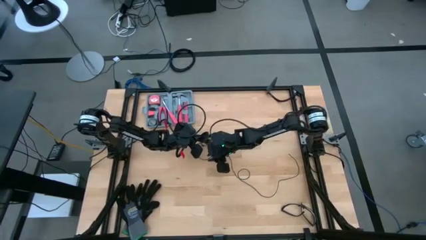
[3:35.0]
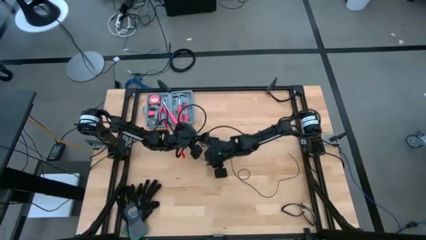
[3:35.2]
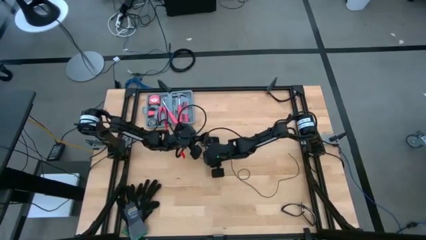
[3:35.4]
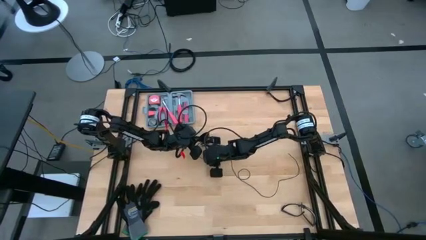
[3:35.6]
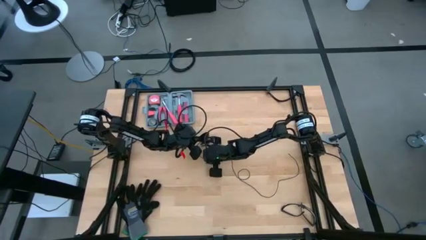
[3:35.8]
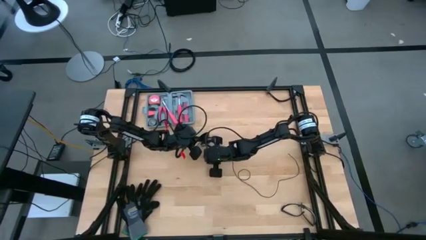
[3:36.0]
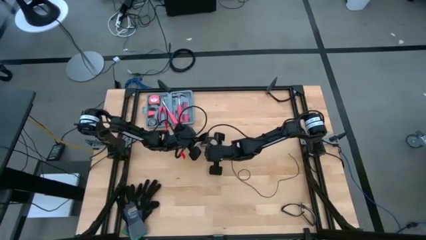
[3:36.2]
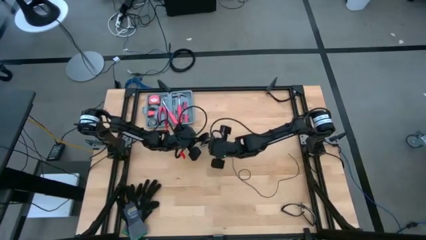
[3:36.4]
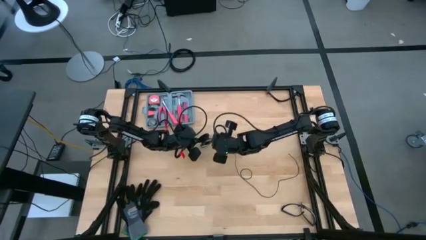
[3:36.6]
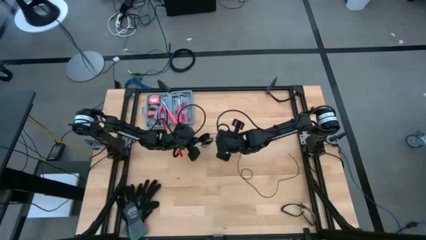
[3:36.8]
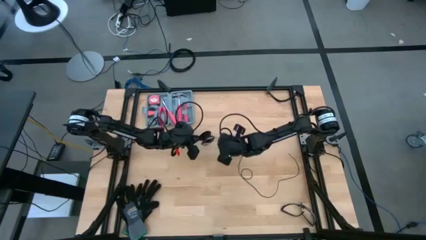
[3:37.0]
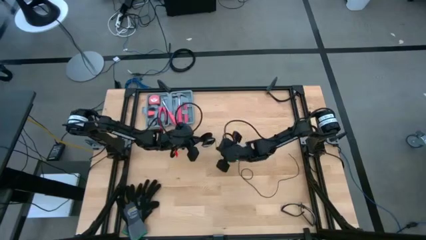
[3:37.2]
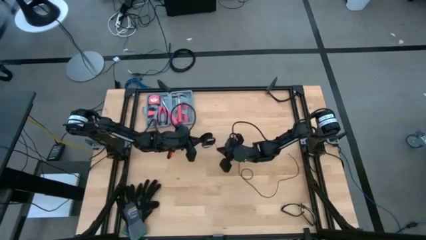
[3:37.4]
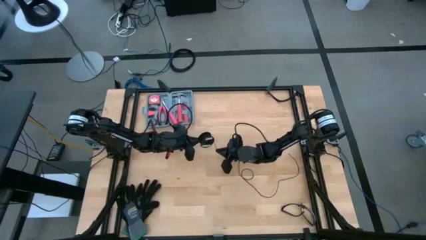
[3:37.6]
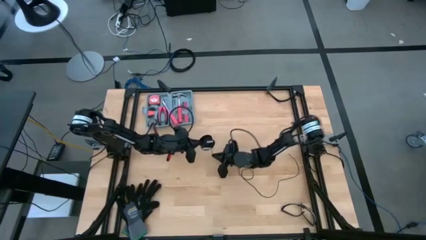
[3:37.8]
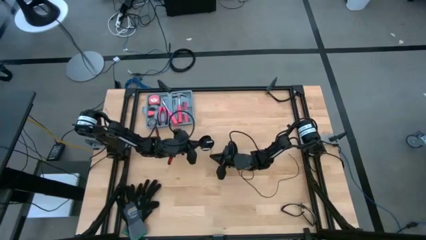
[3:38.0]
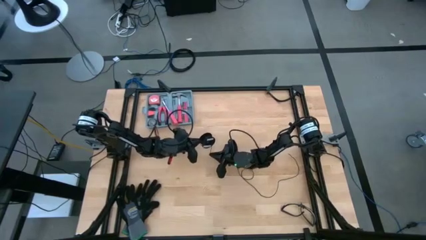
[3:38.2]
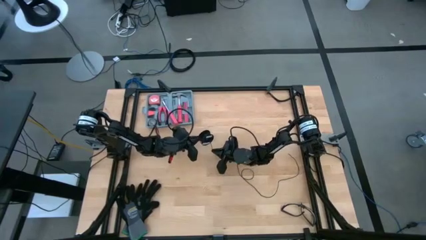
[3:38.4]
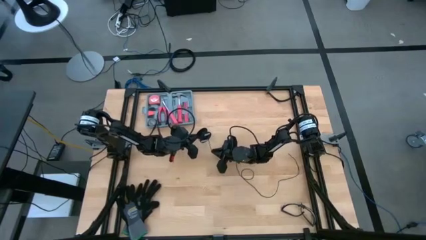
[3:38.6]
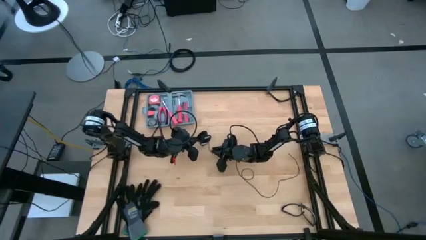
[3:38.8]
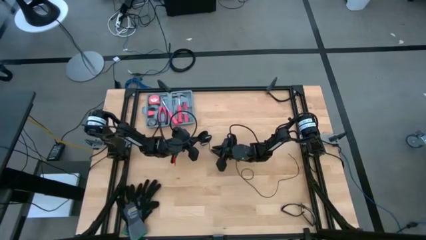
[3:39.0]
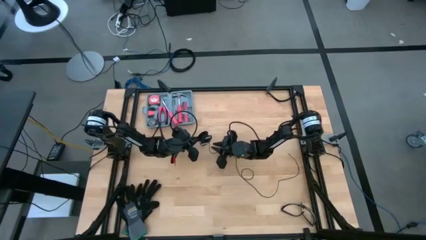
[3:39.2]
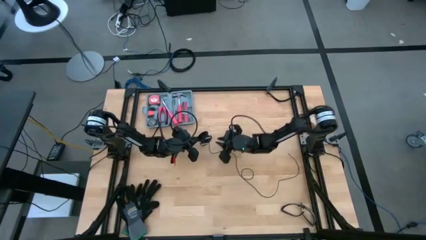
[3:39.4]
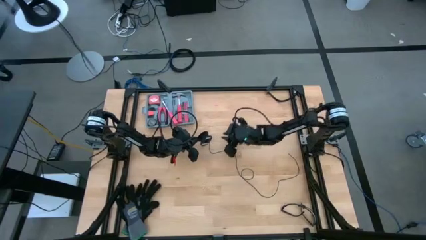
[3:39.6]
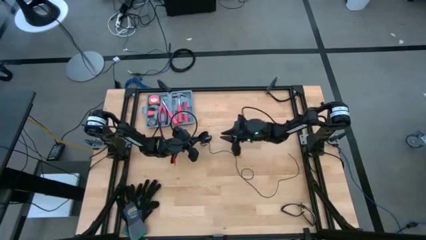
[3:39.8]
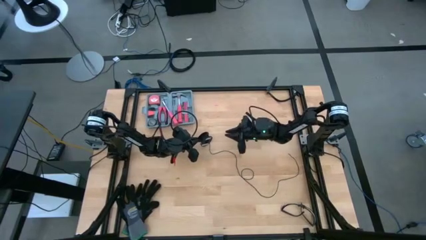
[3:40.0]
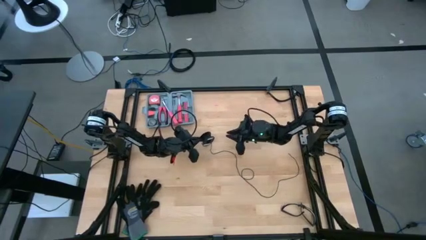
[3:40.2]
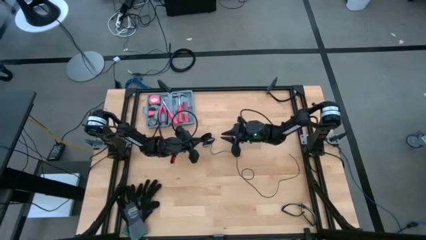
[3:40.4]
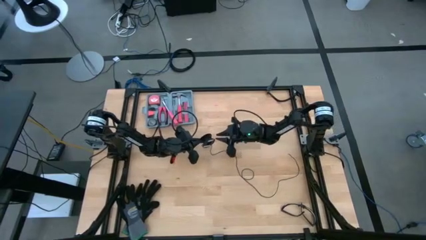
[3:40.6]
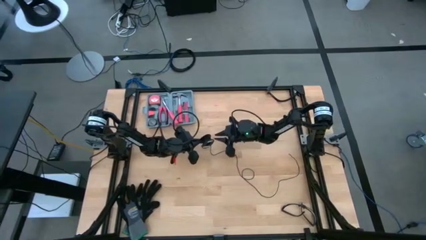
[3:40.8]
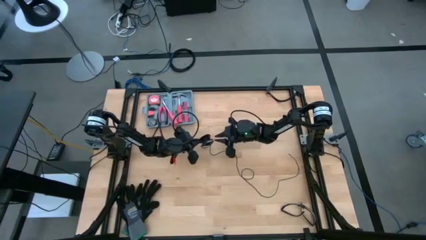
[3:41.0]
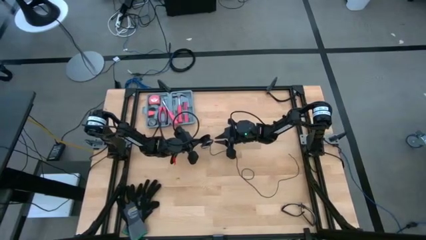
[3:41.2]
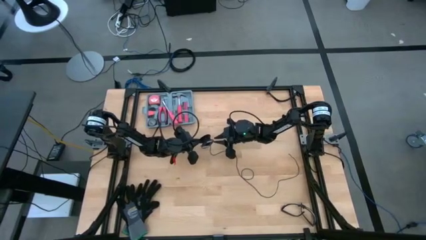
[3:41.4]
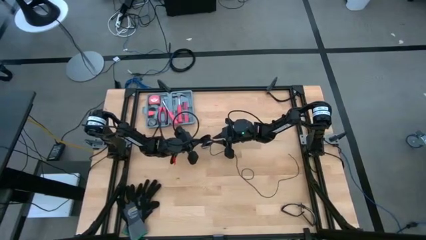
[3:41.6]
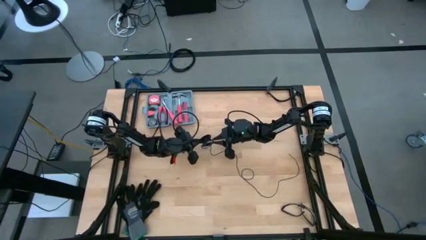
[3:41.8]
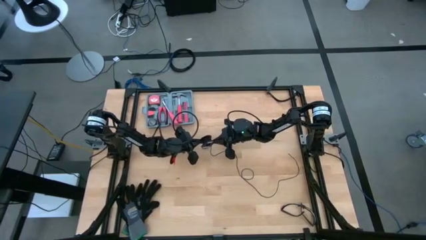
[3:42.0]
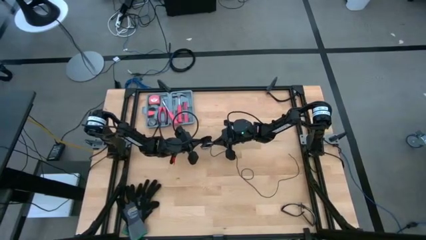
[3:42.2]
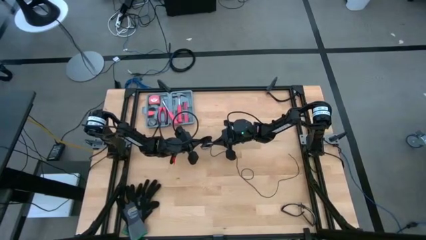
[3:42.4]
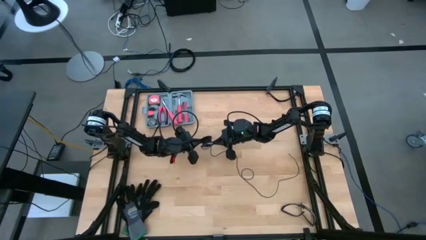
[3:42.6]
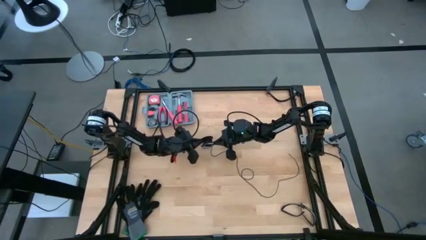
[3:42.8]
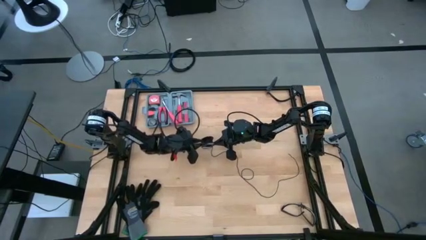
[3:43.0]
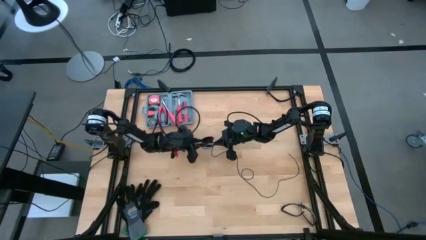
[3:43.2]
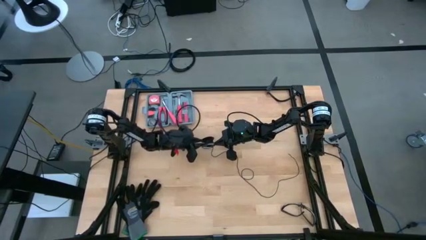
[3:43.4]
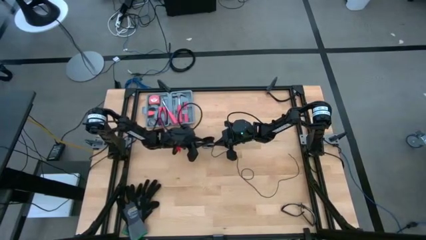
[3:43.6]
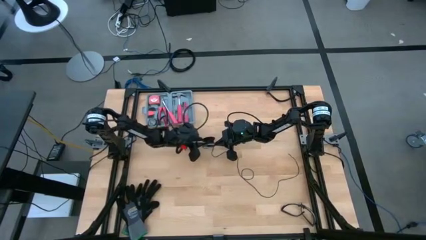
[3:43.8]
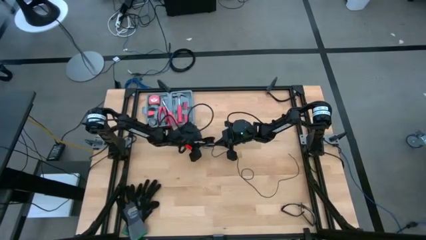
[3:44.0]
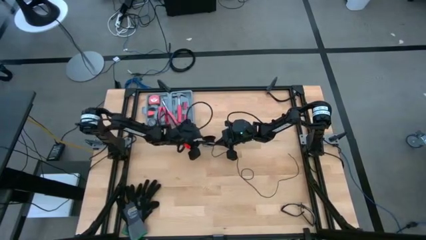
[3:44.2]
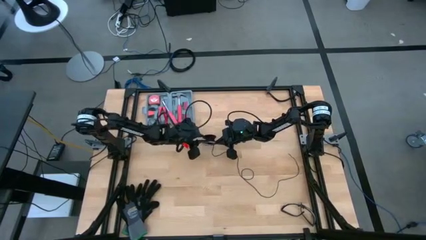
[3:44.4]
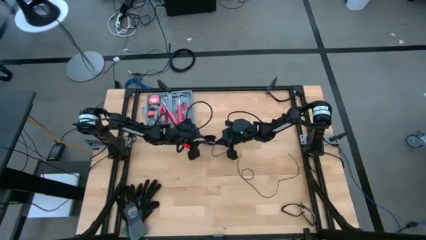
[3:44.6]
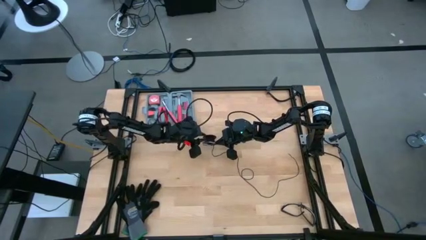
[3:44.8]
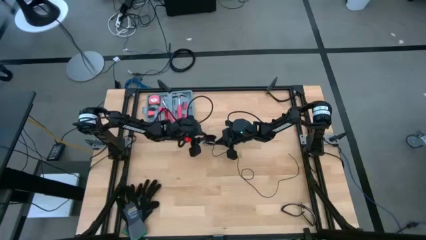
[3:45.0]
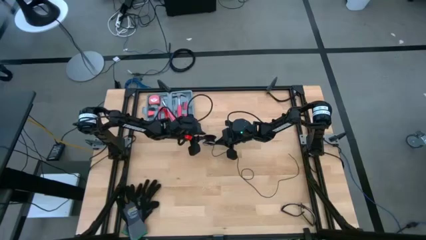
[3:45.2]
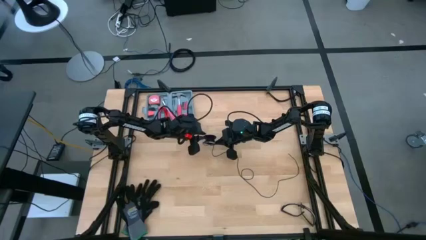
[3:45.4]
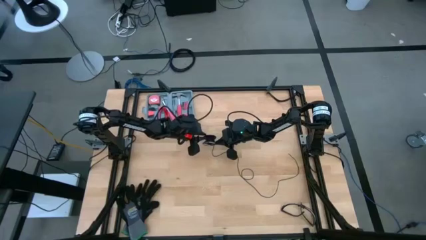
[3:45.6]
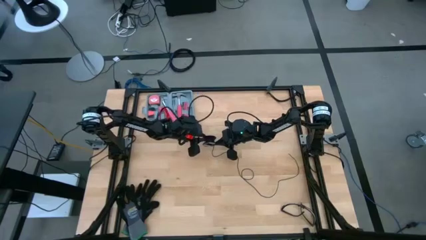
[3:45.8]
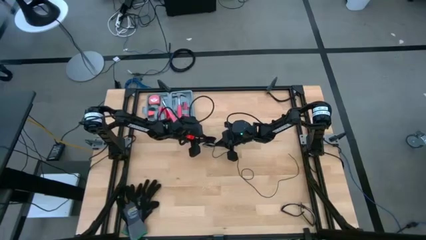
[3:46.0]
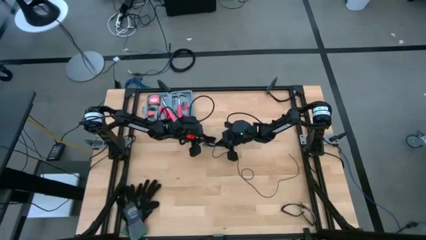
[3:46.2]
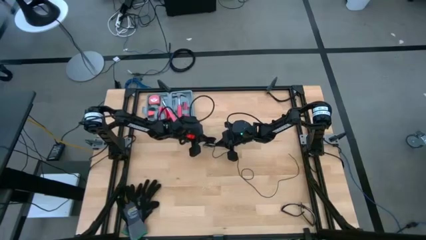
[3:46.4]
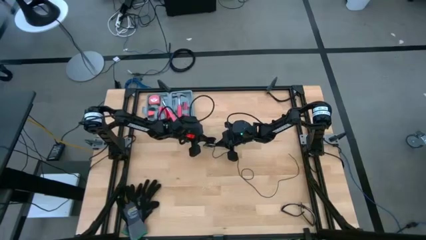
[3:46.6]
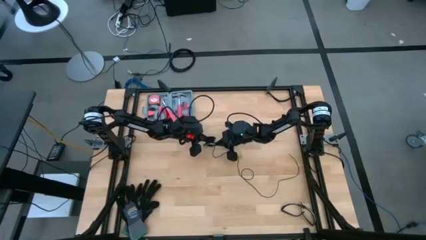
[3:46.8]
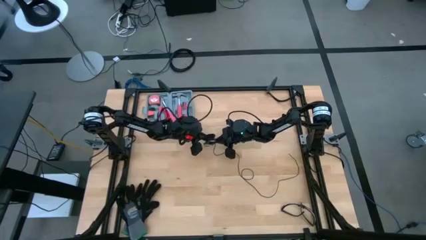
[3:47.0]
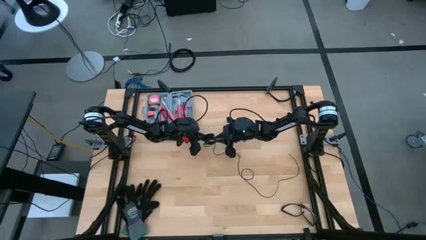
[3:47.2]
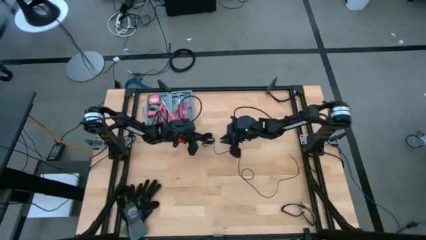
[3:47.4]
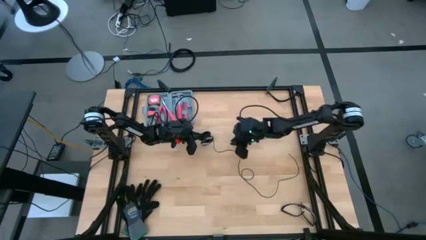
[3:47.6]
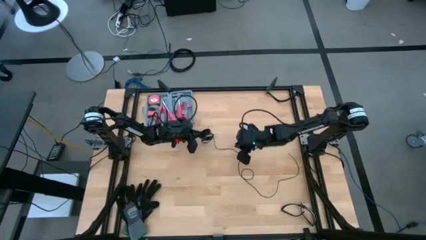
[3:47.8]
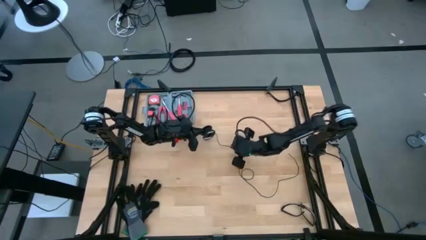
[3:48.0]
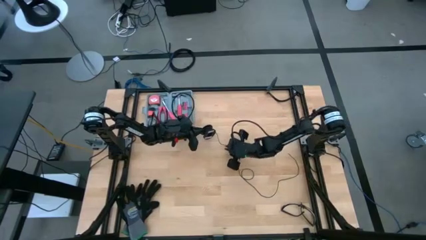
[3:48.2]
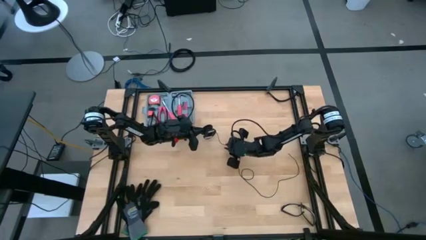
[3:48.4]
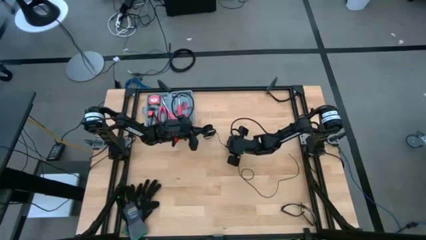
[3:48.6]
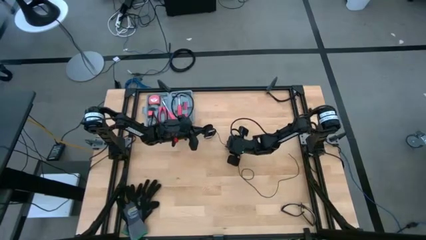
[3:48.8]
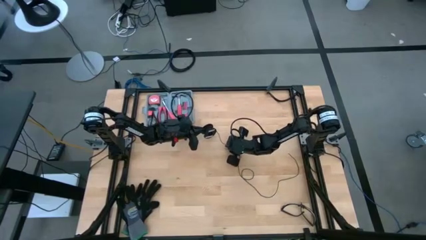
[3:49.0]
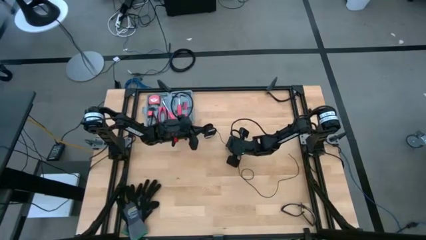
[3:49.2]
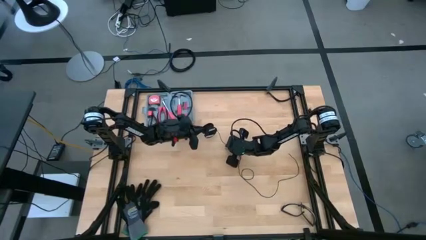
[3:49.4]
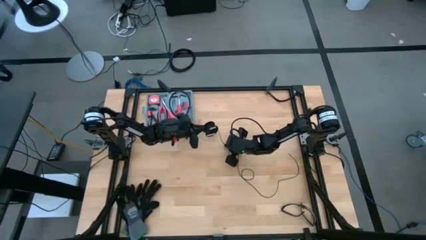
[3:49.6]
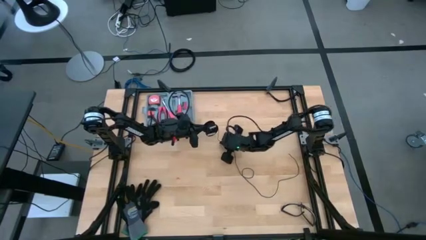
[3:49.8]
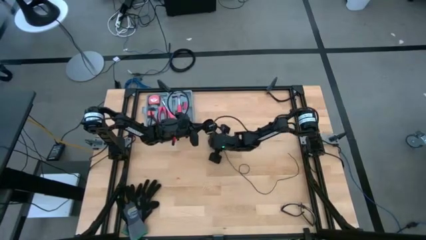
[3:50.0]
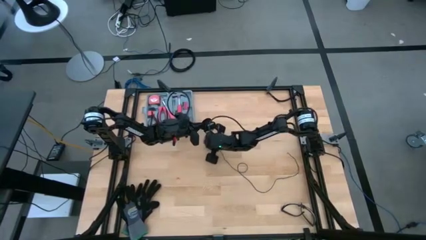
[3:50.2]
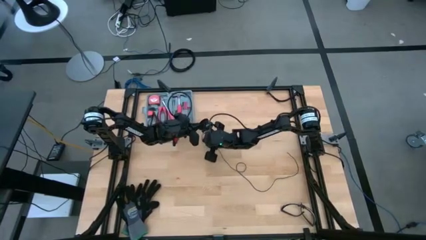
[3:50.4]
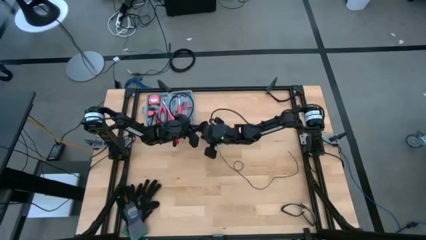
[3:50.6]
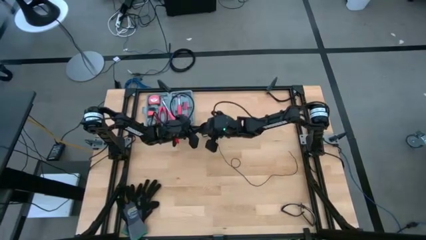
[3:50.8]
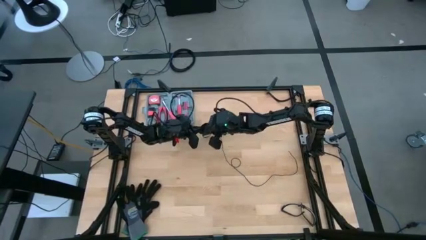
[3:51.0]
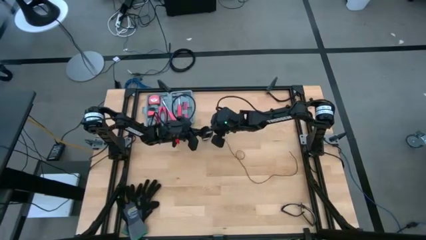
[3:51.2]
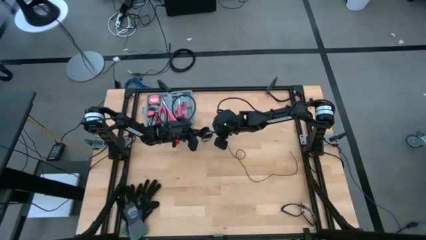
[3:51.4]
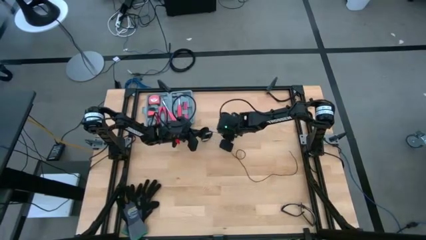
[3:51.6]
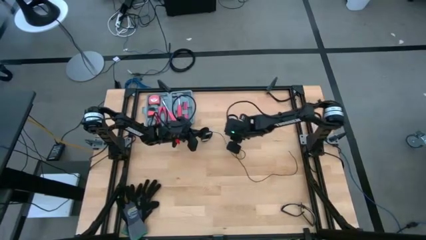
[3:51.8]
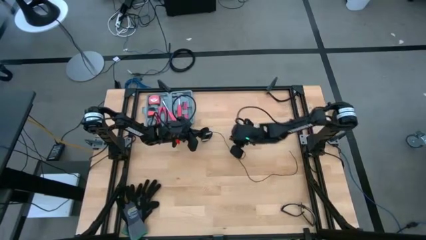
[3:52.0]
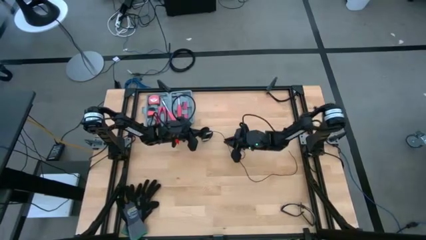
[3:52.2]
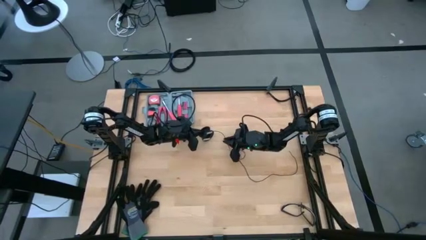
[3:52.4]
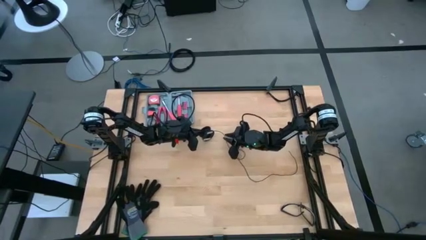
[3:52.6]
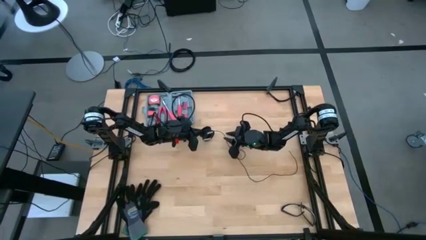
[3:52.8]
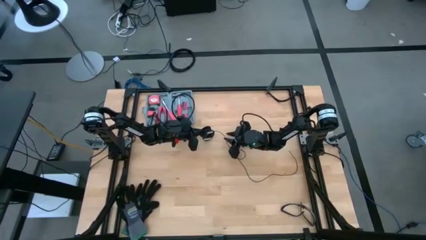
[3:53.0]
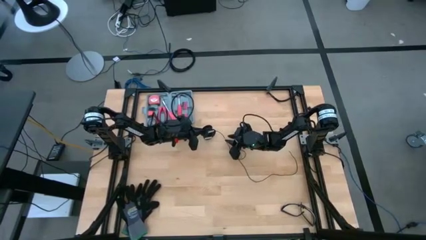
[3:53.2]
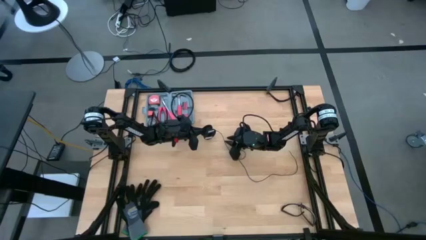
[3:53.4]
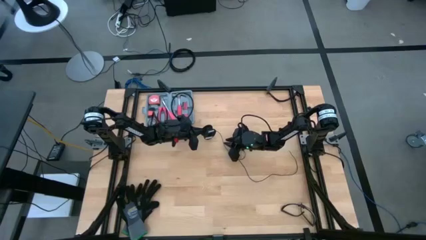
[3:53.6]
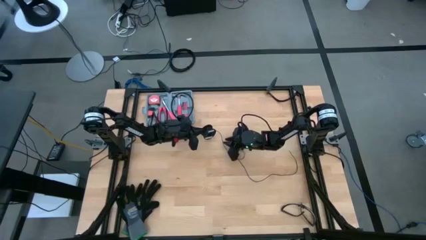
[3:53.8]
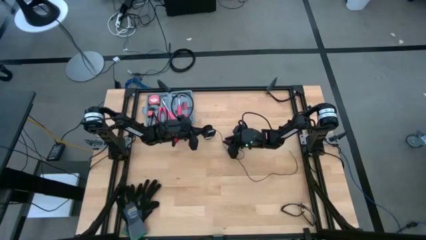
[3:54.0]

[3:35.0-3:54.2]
Task: Coil cords
Coil the black wire onto the spool
